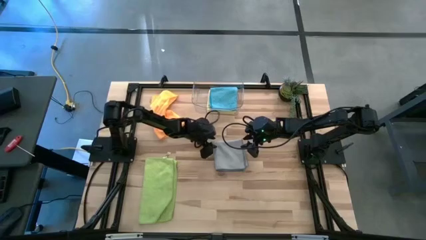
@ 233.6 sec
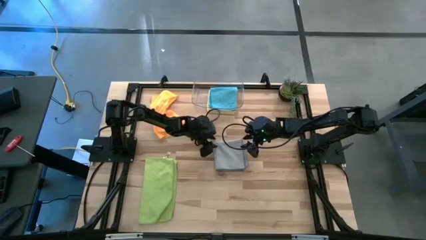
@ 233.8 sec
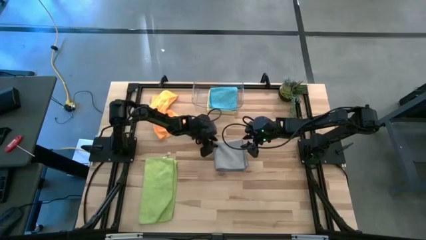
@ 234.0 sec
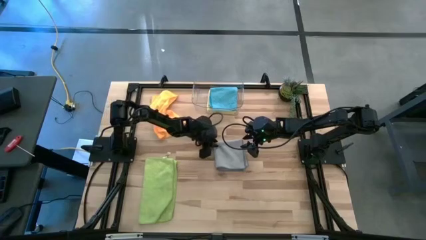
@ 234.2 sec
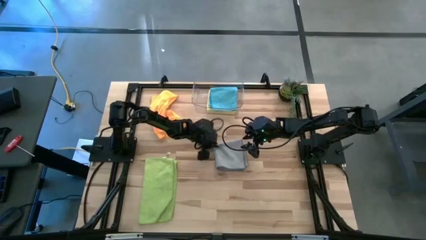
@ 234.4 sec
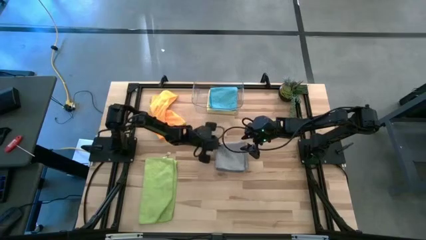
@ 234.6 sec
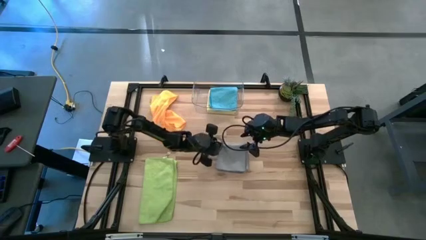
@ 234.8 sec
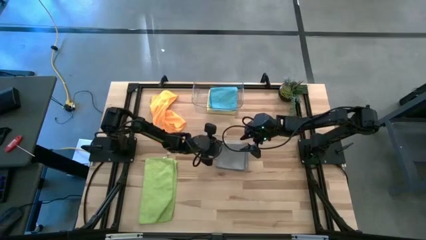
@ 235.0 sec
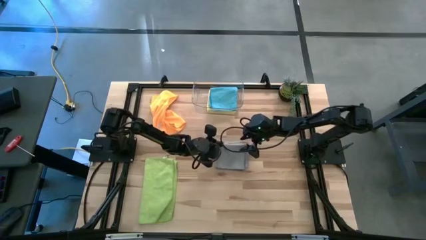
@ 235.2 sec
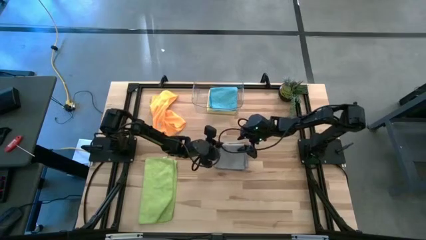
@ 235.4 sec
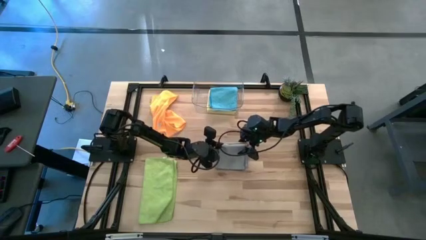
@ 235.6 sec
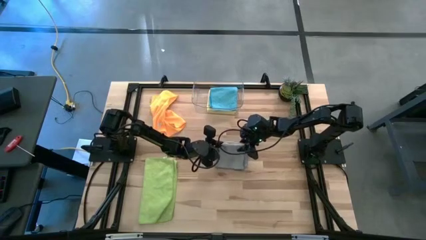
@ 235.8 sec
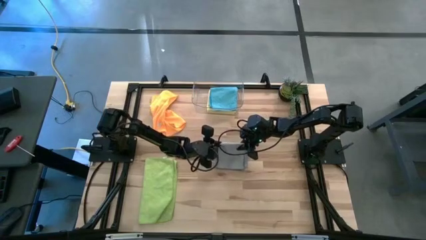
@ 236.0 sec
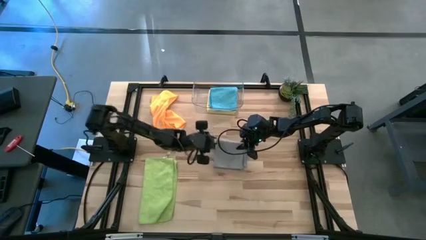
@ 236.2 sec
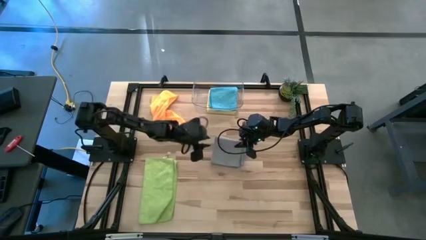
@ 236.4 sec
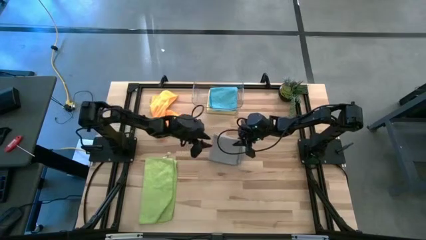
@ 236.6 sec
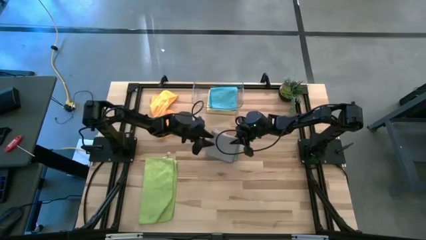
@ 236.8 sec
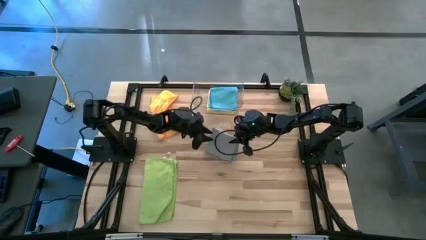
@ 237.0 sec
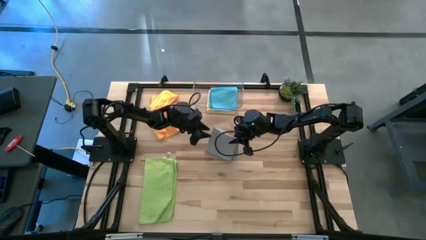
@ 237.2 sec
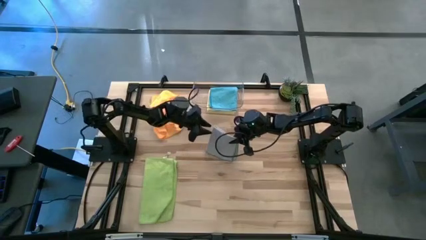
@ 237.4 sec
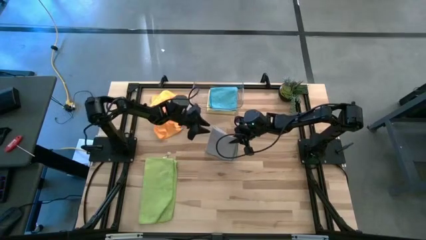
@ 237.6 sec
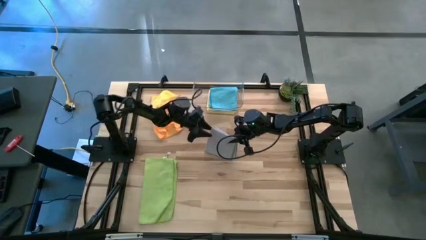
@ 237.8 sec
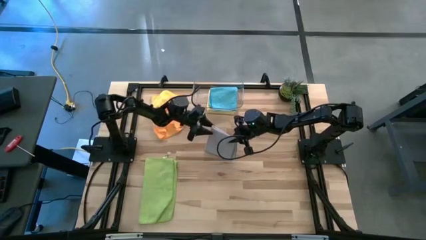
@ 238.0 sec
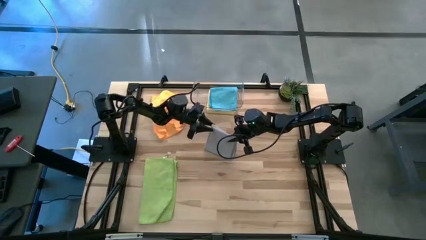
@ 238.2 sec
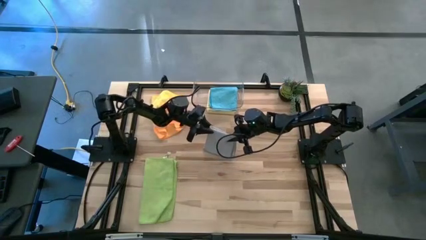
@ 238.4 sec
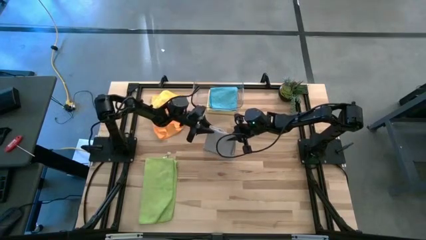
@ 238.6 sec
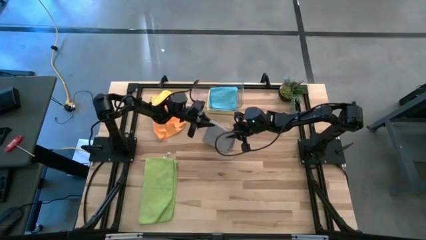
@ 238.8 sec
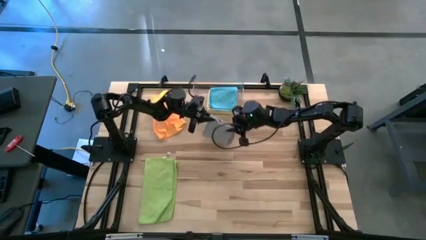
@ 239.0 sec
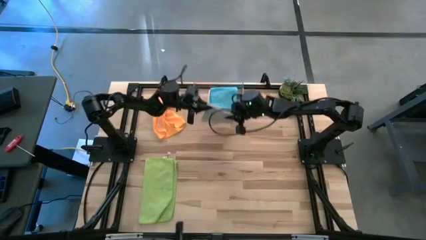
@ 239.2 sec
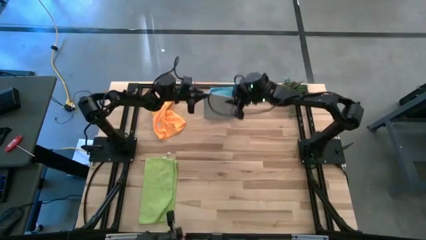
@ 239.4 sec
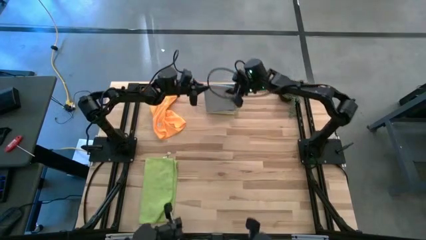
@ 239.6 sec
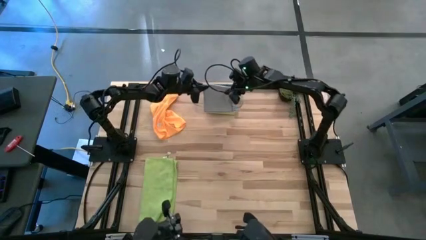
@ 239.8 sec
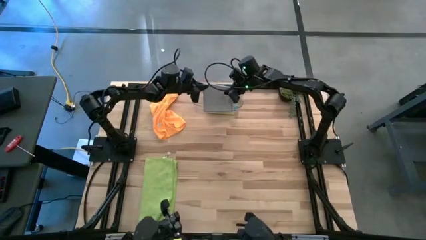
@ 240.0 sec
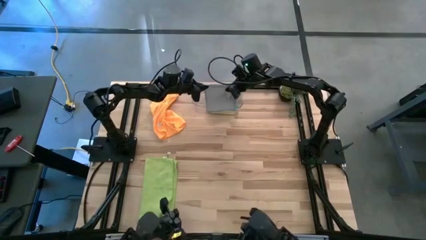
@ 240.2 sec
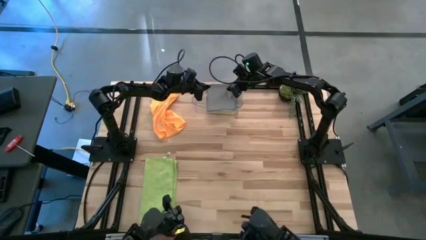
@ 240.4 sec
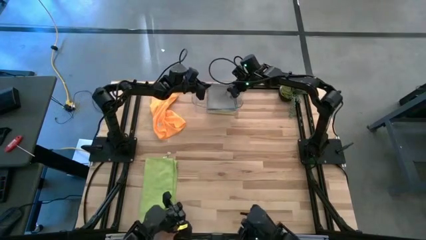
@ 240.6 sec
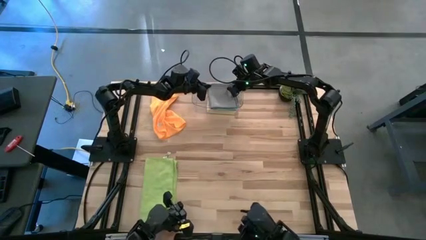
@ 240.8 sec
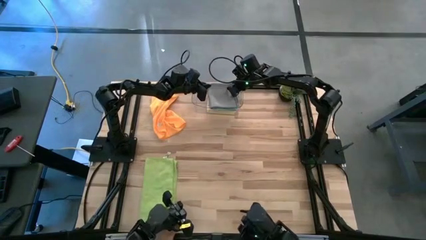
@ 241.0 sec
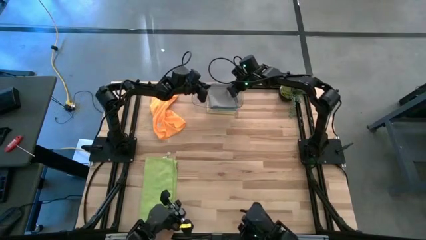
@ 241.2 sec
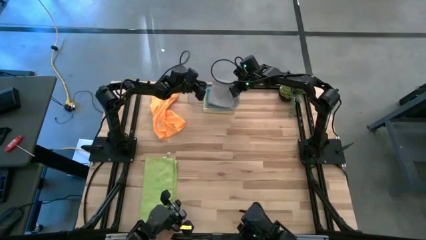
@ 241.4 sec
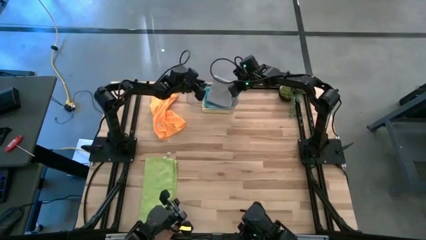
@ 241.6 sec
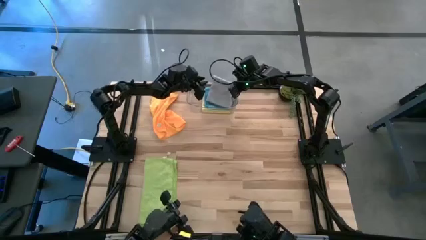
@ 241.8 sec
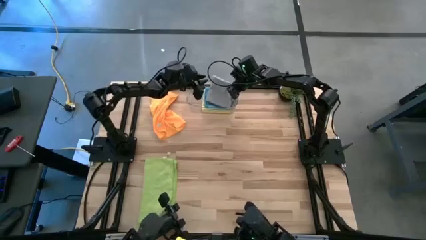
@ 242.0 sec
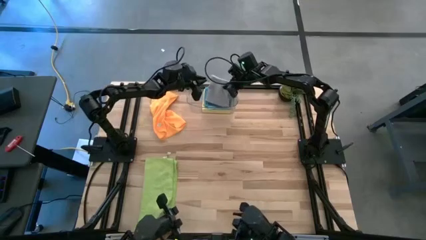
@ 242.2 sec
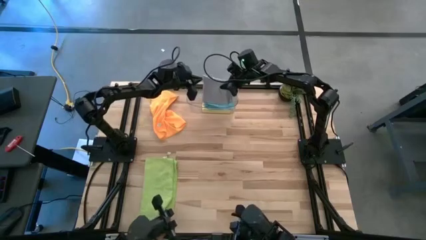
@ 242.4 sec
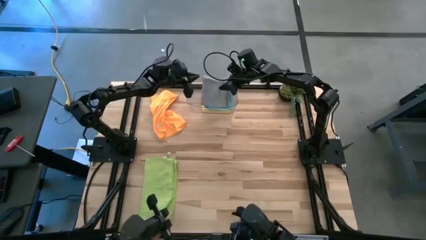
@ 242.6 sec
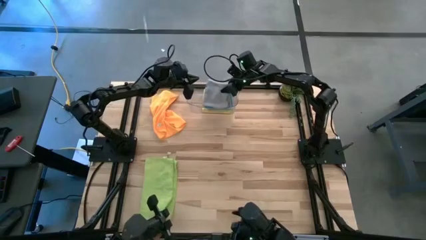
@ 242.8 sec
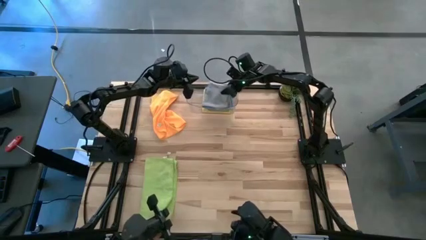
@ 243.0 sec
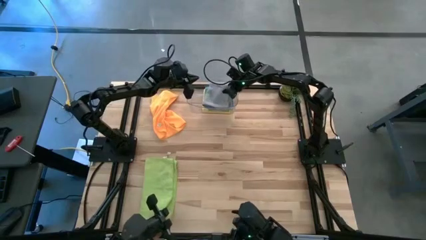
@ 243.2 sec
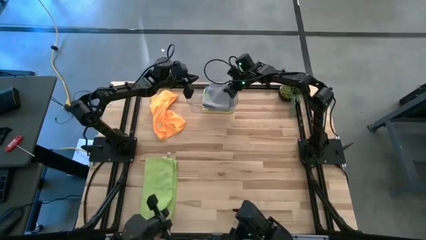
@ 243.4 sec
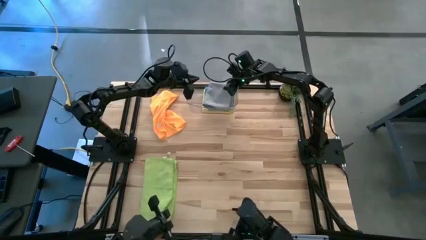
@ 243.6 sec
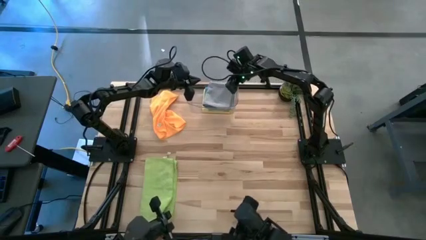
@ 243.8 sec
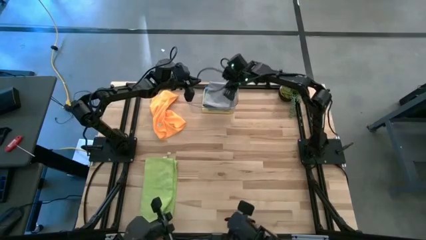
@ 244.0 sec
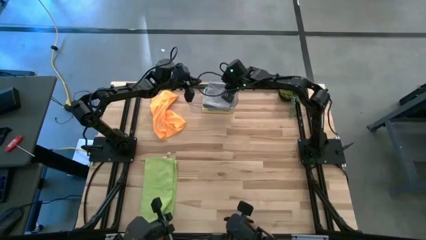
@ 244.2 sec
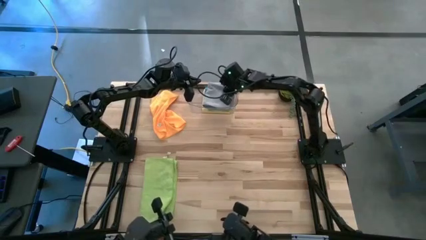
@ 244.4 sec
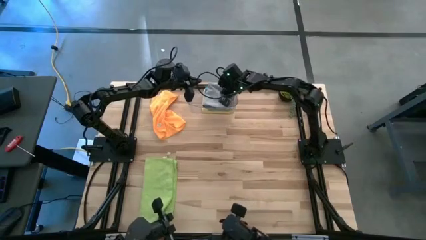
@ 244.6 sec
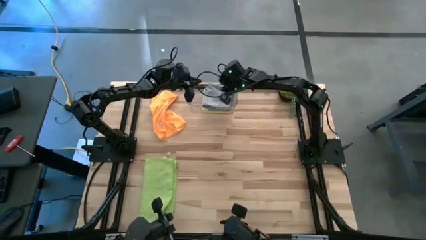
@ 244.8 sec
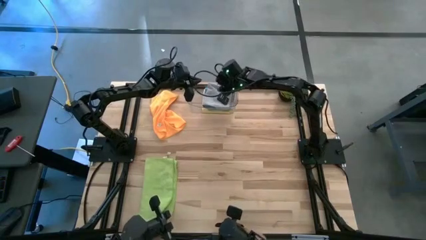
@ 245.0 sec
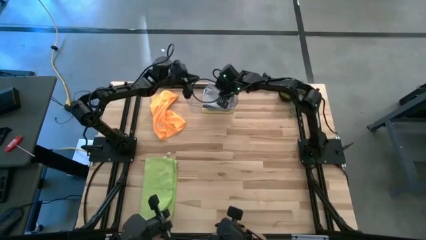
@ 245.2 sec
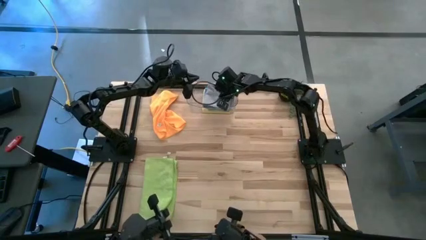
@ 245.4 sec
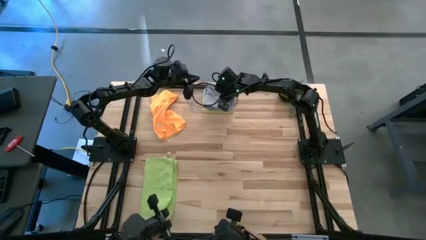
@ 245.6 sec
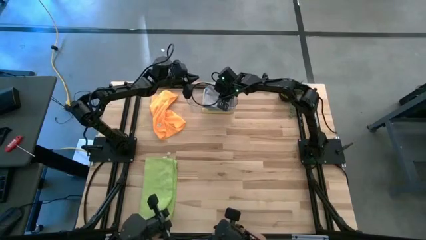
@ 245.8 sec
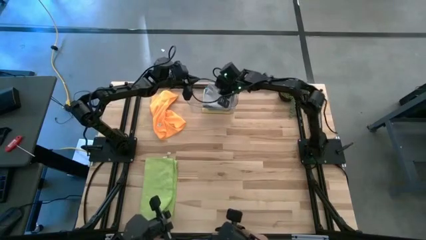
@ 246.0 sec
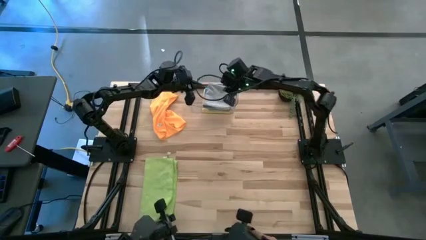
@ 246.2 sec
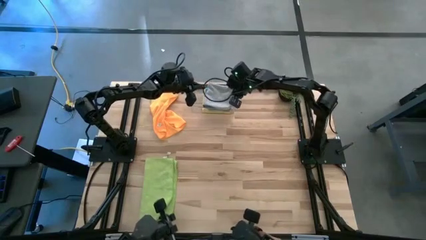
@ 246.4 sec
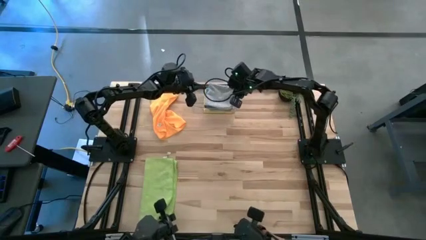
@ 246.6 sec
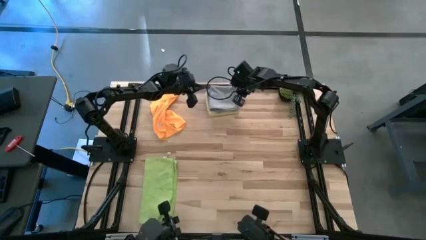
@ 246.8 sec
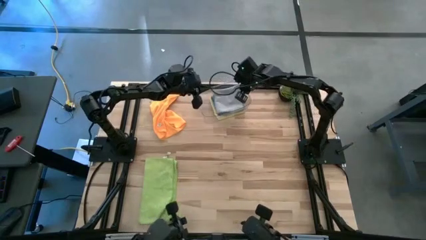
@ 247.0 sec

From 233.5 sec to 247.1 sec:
Task: Fold microfiber towels
Stack the gray towel on top of the blue towel in the transparent bin

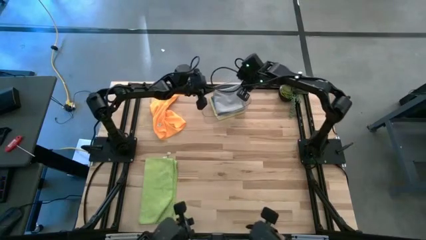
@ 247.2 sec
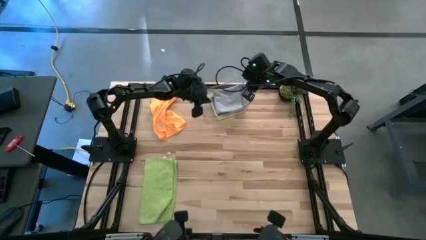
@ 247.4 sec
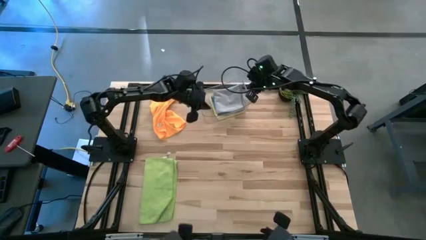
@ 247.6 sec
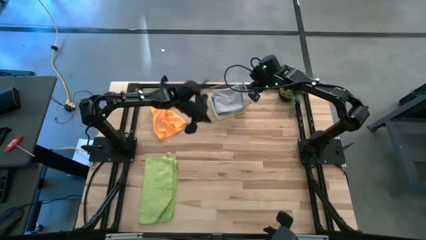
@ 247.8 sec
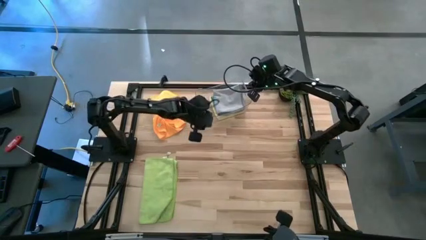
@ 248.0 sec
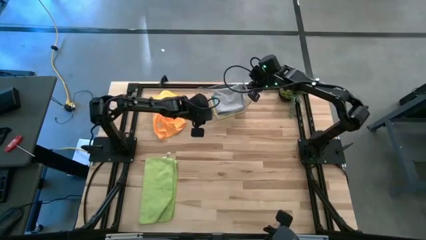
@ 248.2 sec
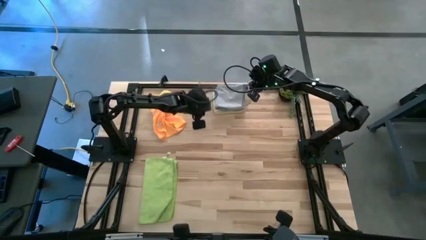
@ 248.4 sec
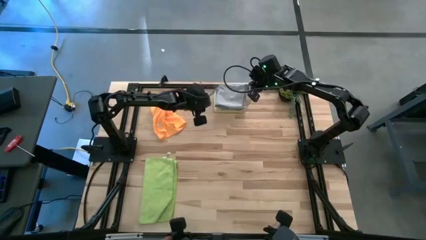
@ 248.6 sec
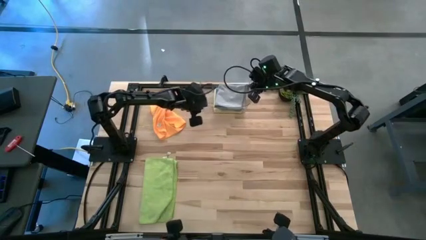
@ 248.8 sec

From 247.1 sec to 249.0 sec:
Adjust the transparent bin on the table

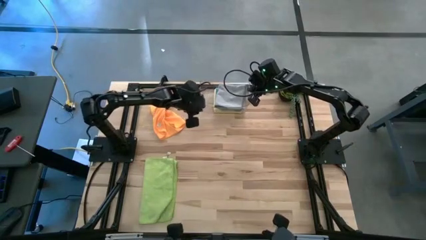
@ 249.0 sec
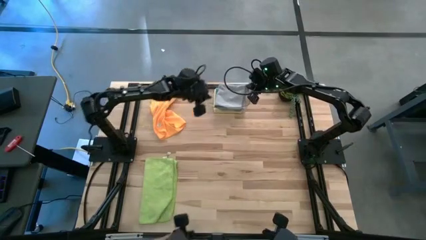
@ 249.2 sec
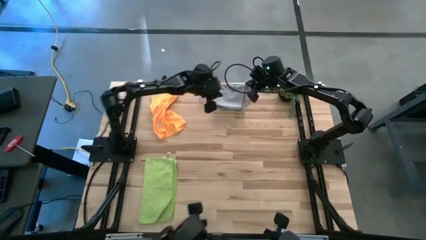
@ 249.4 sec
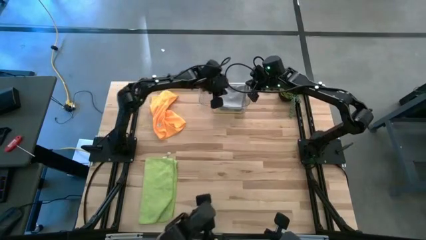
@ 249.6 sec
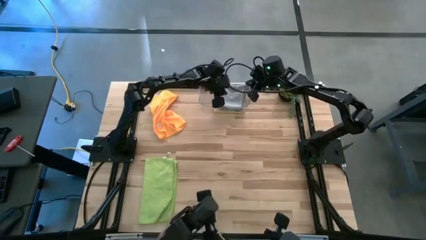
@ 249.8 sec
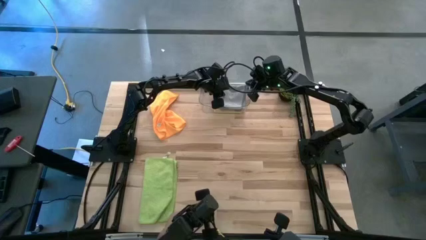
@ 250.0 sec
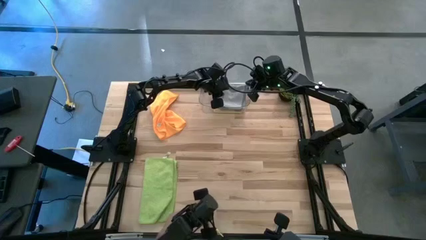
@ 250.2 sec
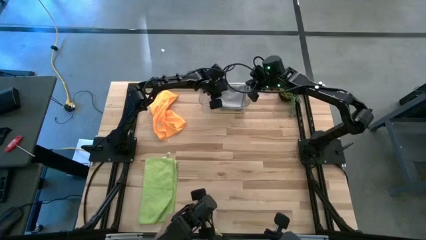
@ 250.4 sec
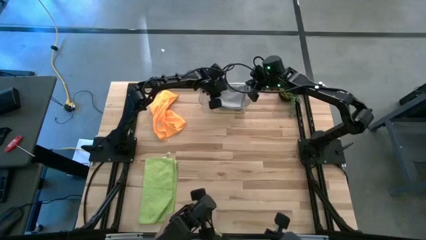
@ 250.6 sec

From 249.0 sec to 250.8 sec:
Adjust the gray towel in the transparent bin
